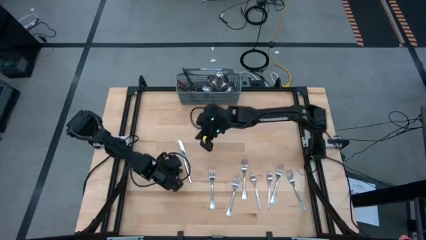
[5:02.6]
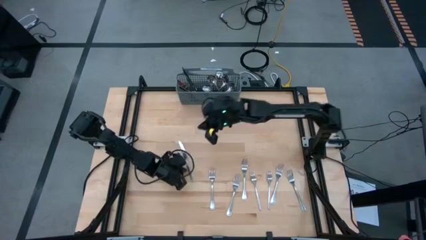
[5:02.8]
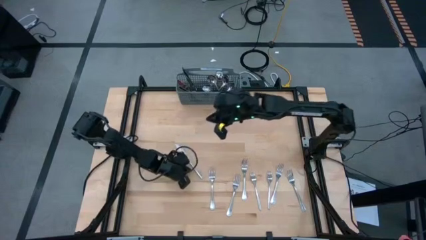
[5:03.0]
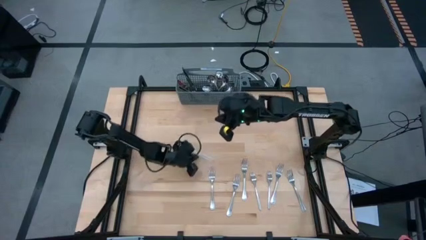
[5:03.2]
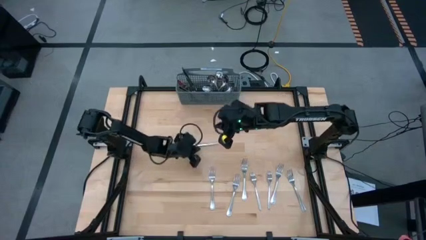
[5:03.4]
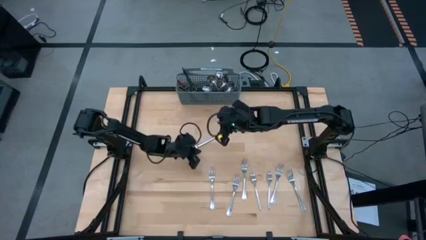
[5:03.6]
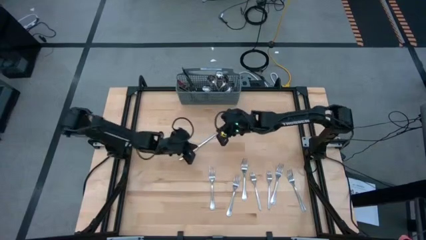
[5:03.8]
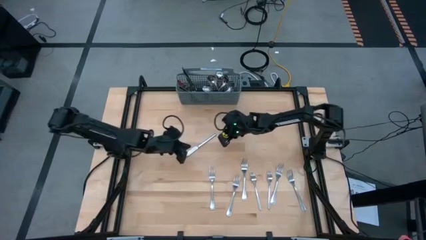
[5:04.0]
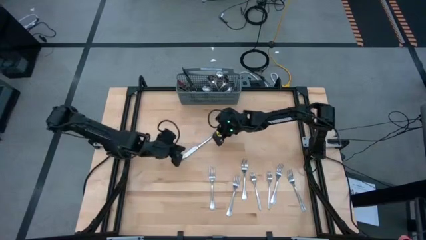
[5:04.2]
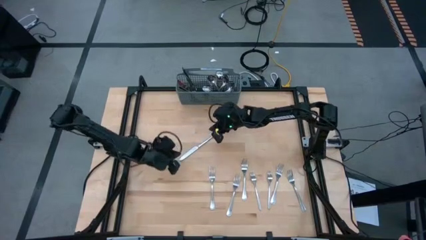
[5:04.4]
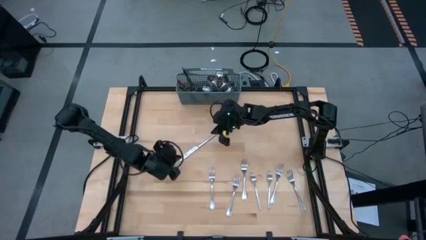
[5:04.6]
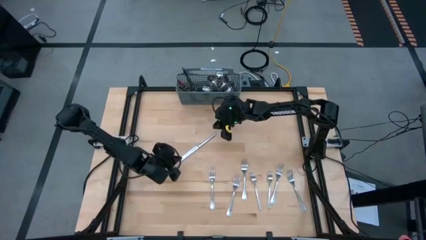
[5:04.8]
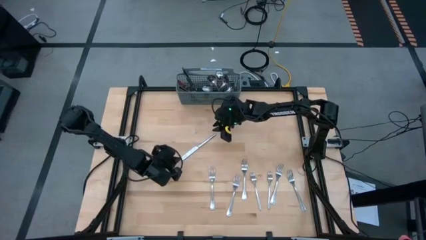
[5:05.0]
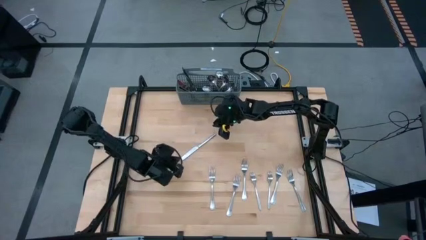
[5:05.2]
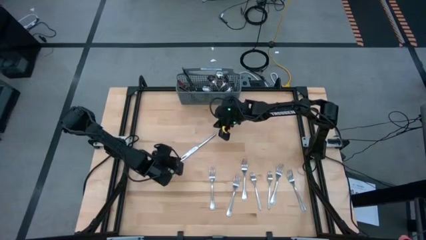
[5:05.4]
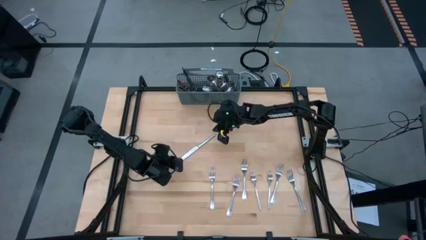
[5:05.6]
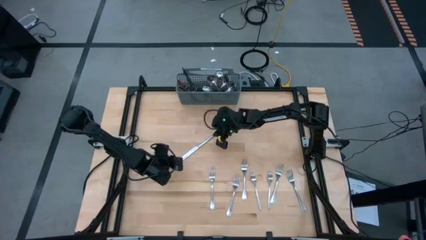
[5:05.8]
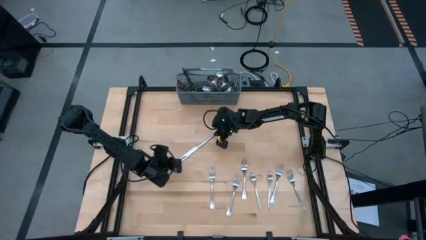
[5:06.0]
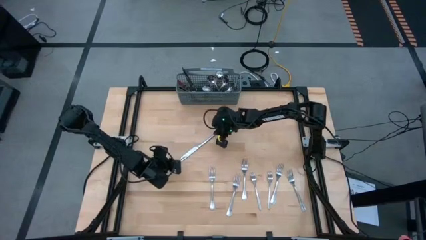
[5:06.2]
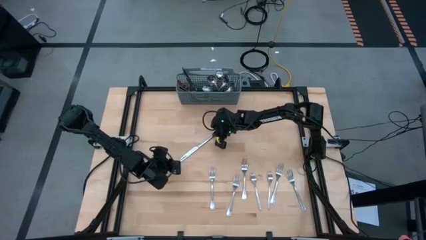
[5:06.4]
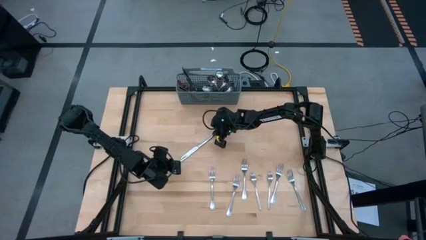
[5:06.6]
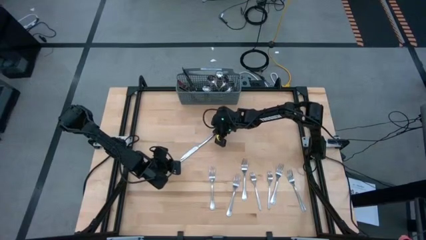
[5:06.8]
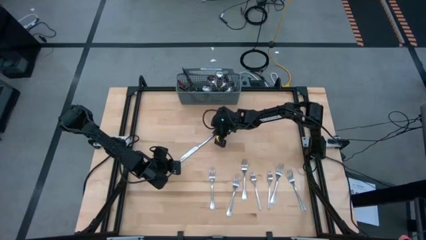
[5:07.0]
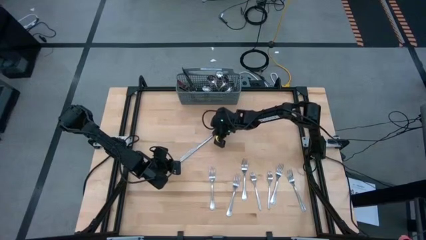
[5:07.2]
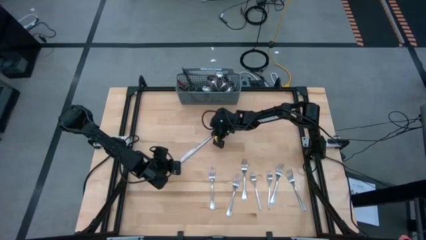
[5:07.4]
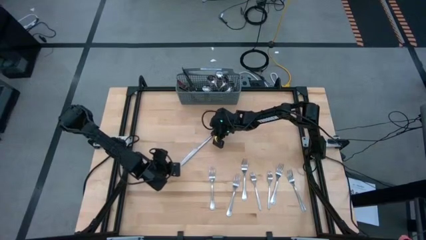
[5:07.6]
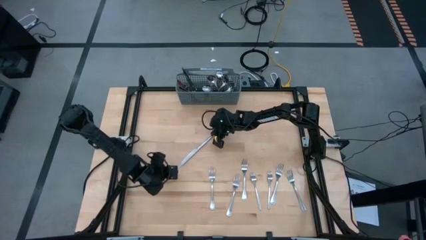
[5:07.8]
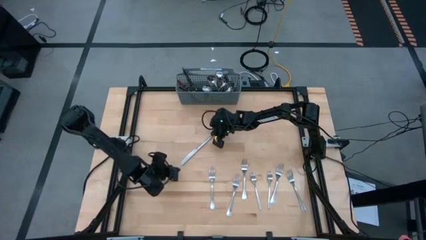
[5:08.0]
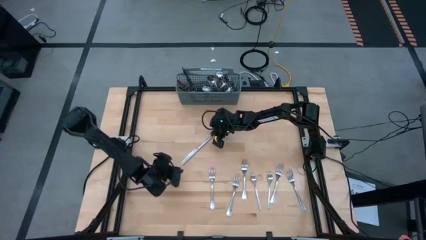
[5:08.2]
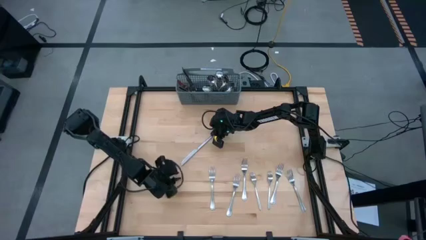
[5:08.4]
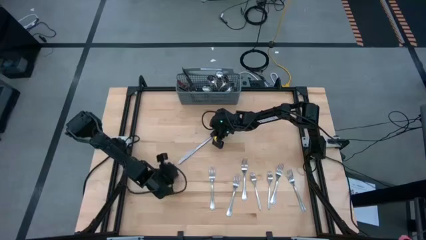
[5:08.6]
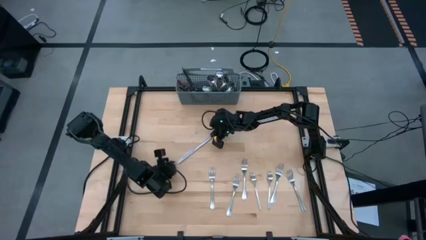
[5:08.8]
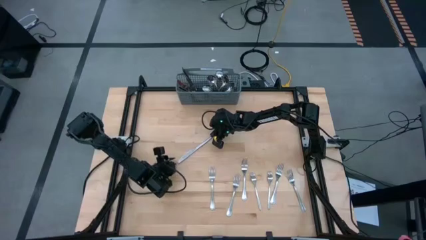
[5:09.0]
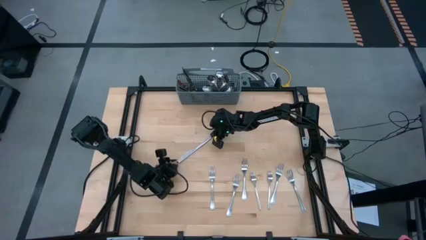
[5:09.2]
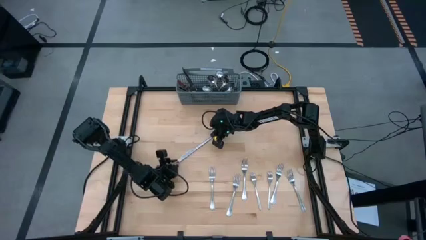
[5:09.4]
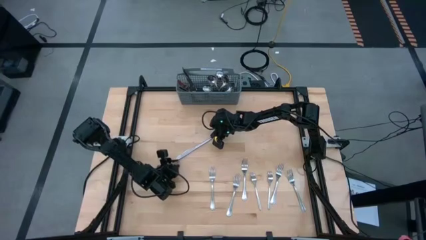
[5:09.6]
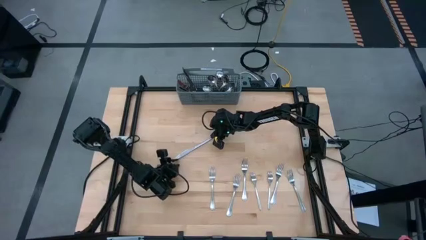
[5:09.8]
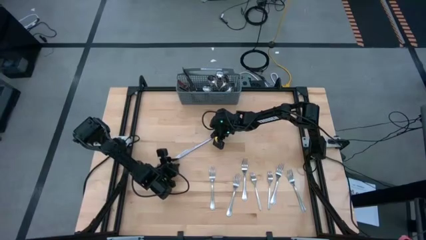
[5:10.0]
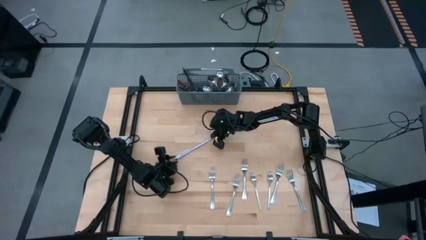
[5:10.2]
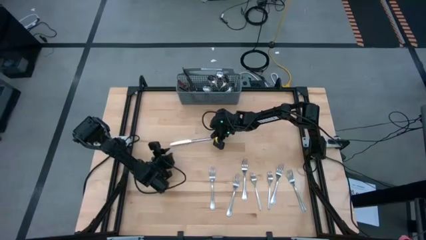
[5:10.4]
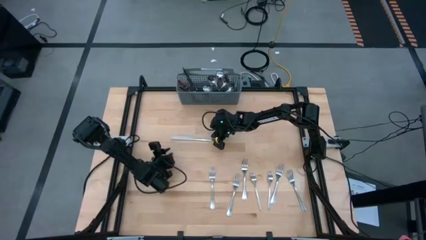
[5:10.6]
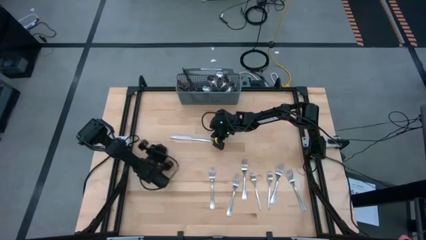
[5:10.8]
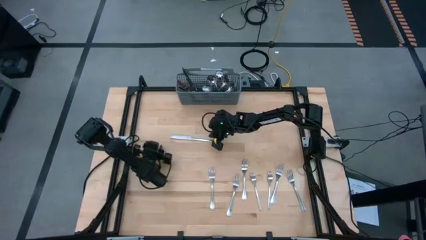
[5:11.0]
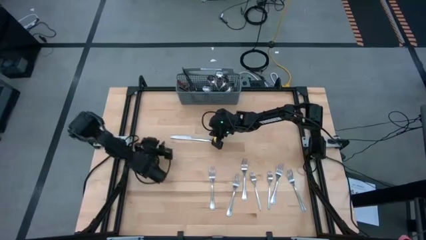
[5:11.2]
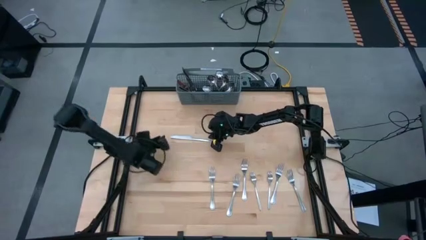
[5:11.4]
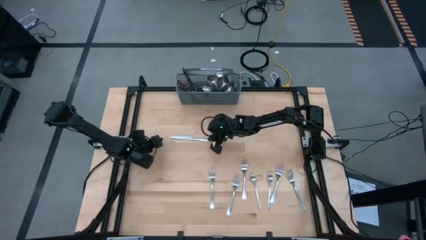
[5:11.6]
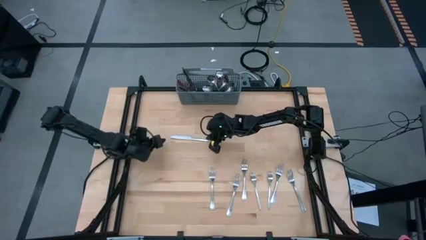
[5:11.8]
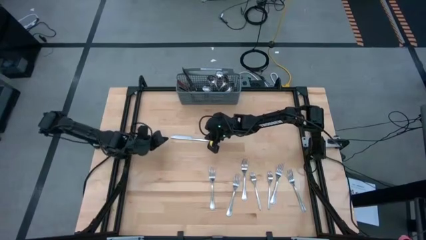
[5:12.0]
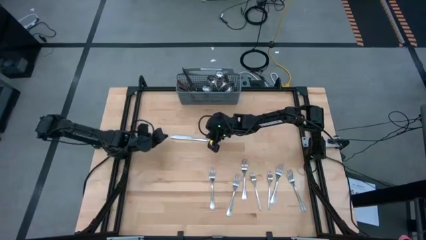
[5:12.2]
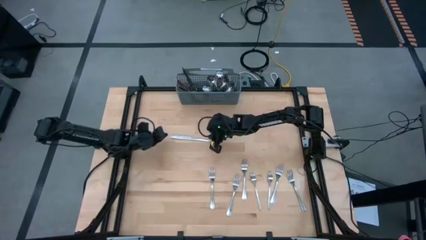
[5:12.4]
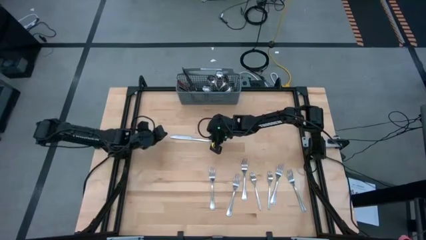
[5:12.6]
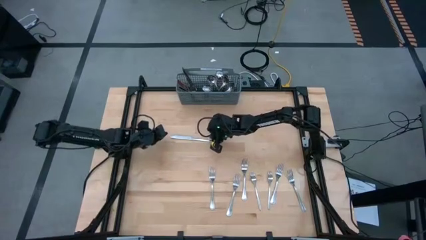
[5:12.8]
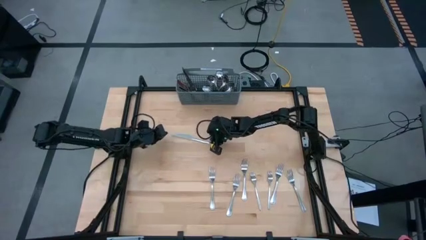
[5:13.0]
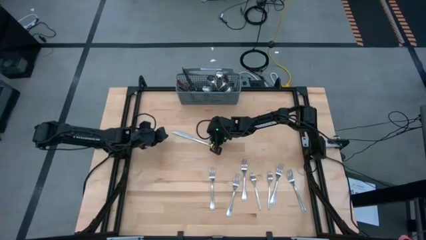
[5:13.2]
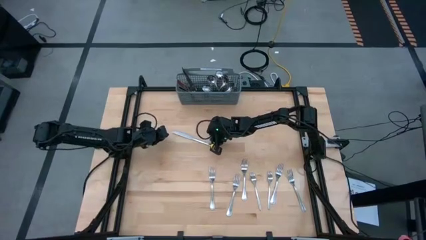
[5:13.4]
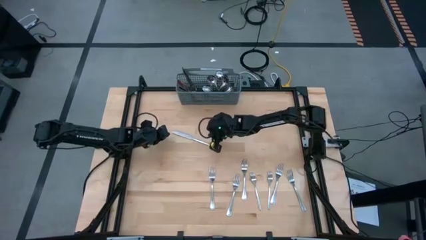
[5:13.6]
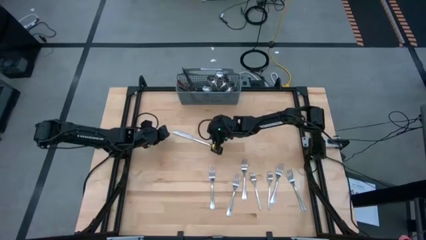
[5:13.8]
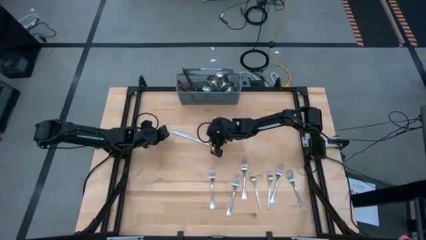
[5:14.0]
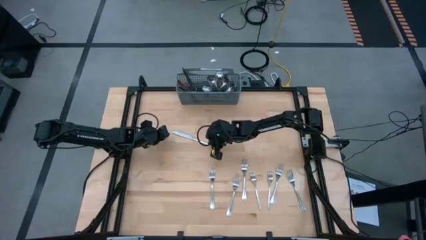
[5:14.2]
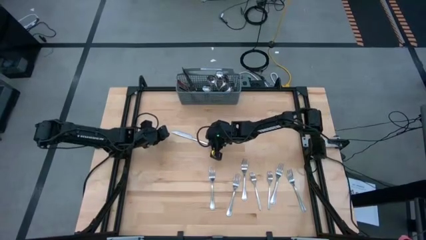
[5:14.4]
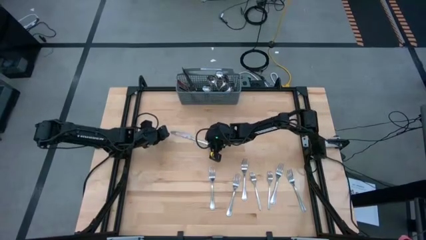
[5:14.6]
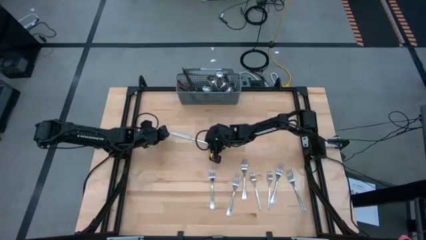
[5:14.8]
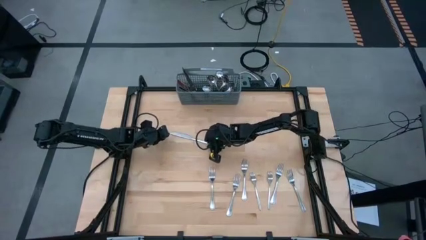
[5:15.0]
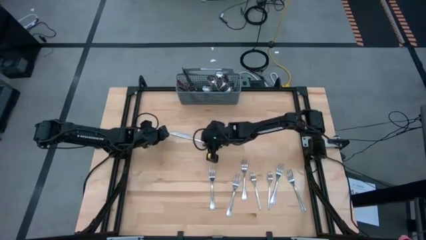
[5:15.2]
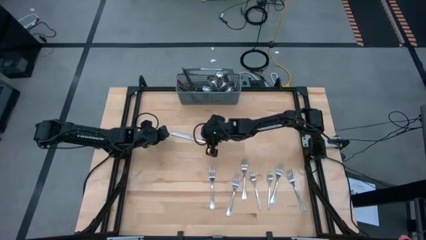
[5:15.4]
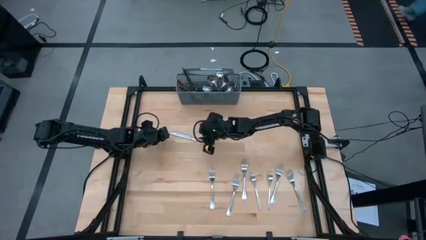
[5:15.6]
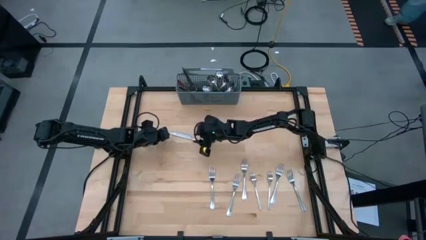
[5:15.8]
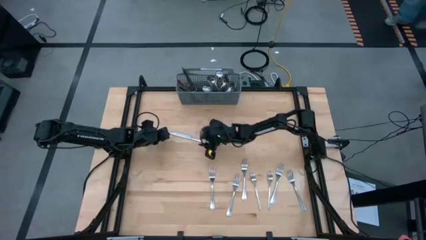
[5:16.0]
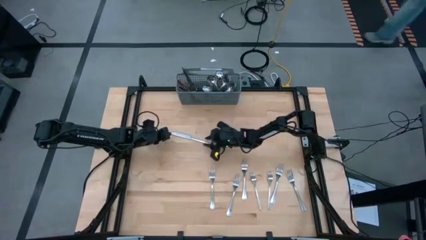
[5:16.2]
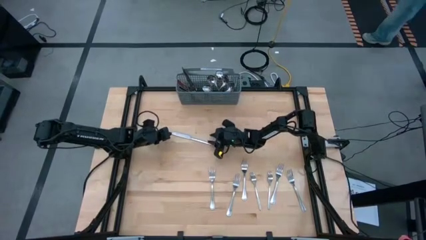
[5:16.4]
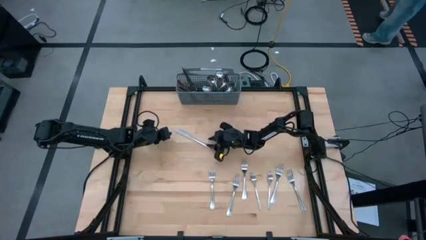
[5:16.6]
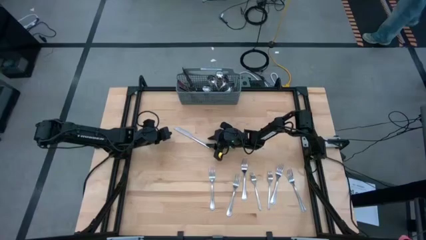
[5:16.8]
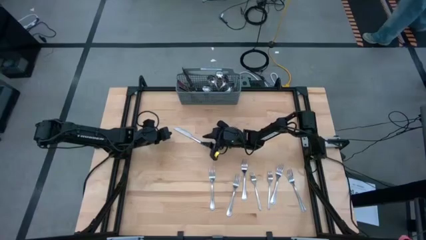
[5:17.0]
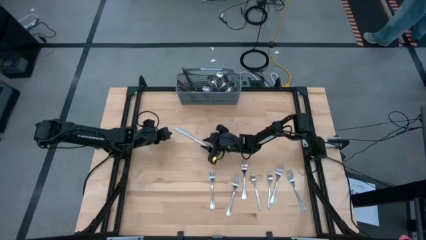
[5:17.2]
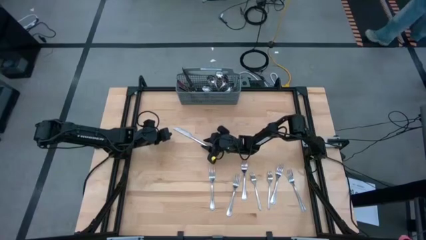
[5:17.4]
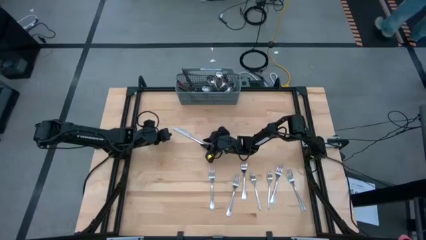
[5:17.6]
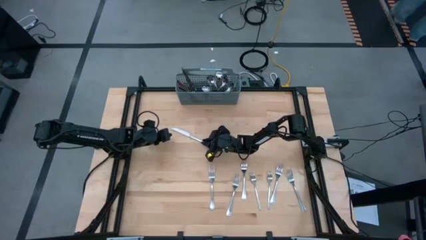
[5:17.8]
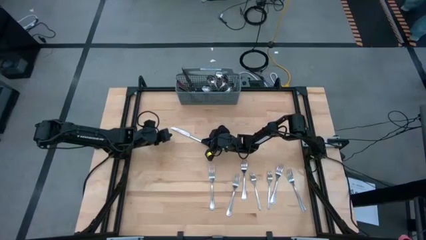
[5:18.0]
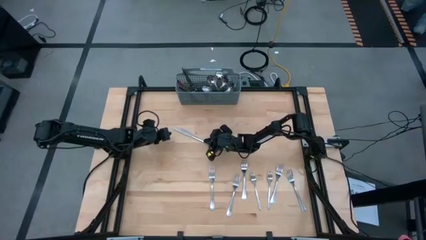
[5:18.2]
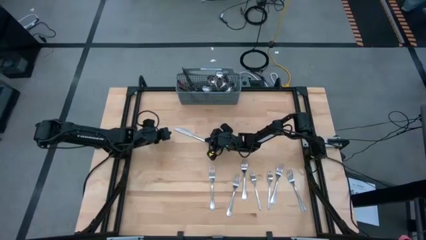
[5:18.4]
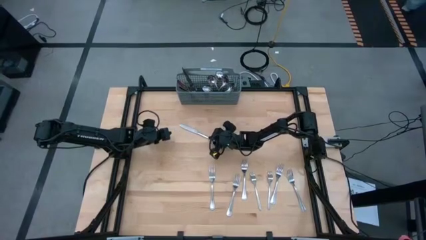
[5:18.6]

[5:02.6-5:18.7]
Task: Sort silverware
Put the silver knife into the gray utensil holder
